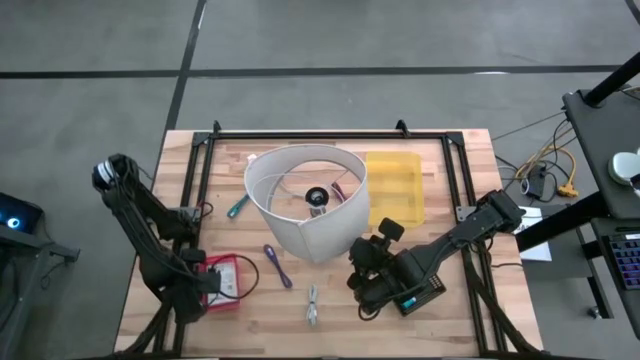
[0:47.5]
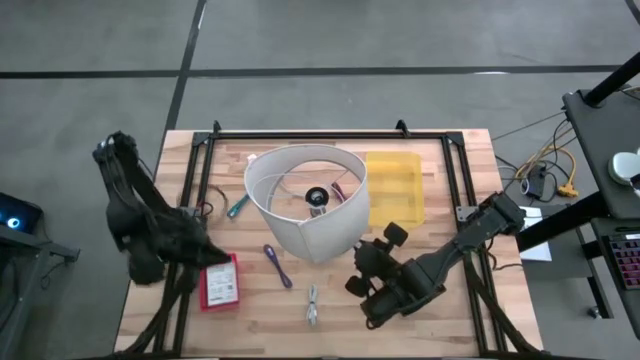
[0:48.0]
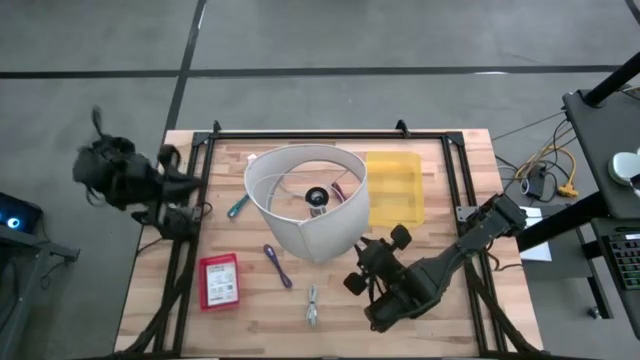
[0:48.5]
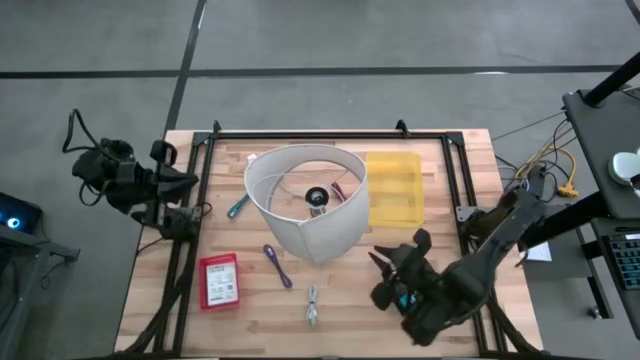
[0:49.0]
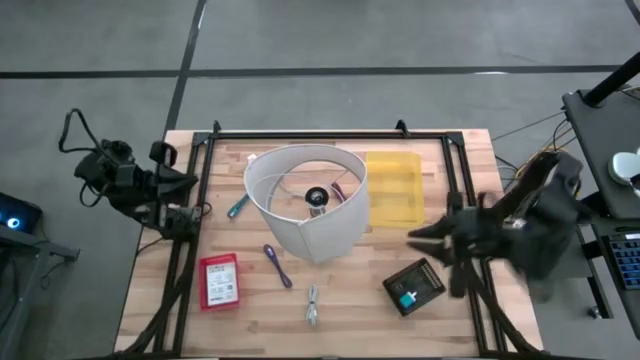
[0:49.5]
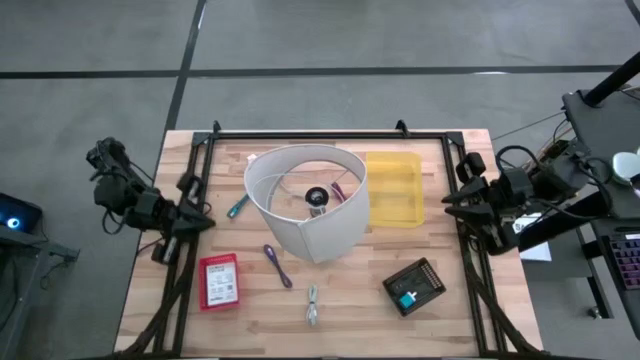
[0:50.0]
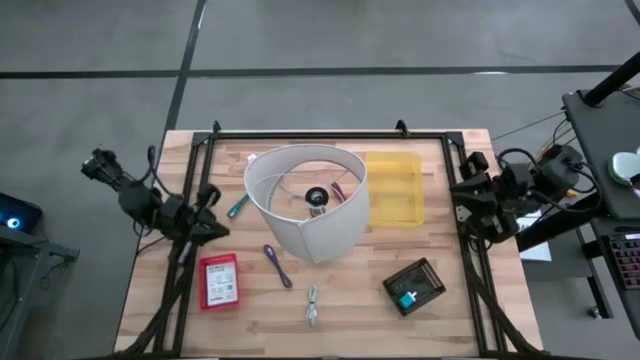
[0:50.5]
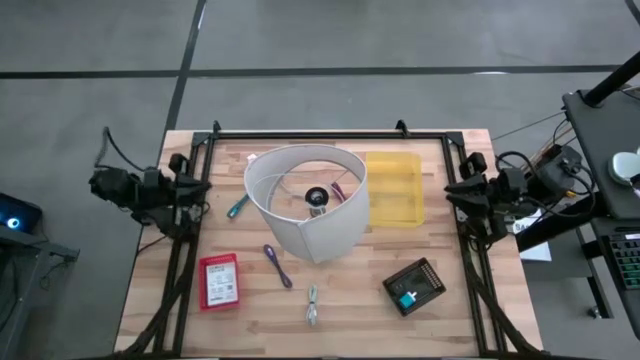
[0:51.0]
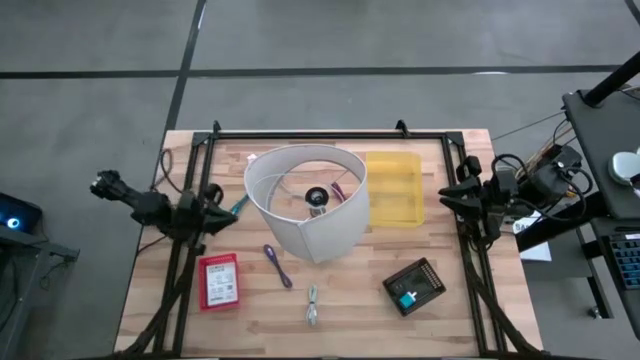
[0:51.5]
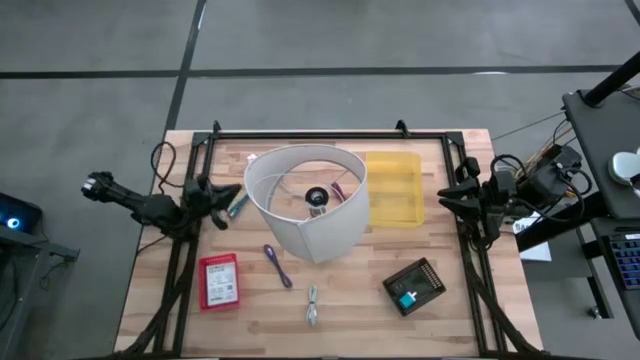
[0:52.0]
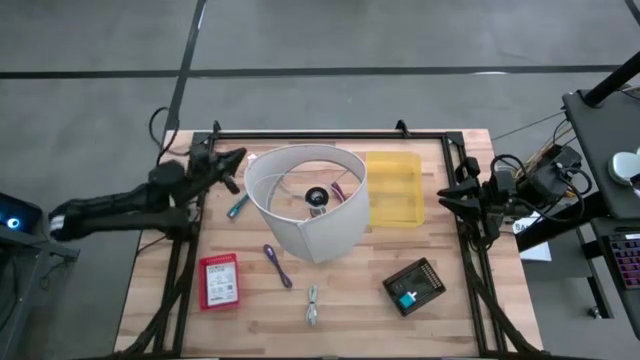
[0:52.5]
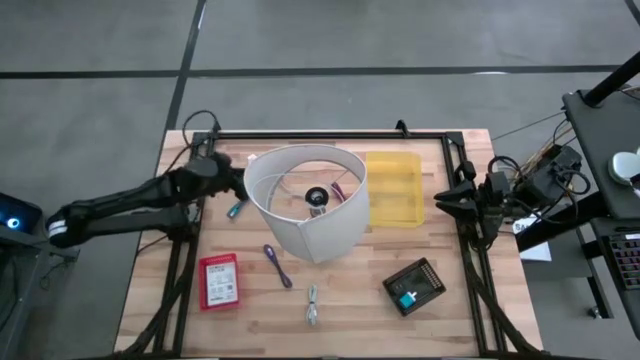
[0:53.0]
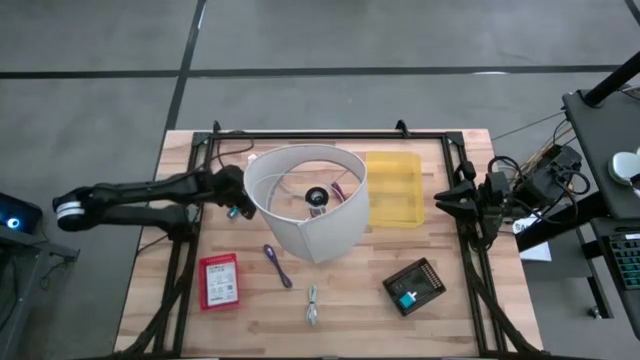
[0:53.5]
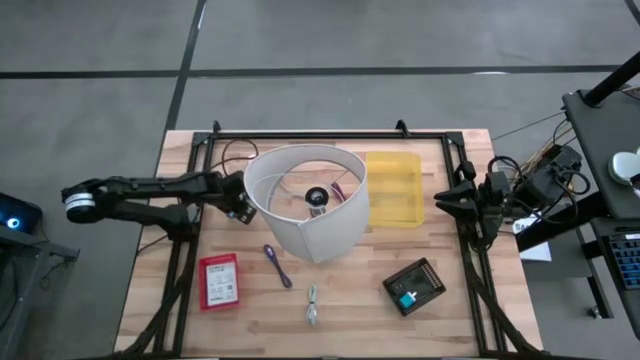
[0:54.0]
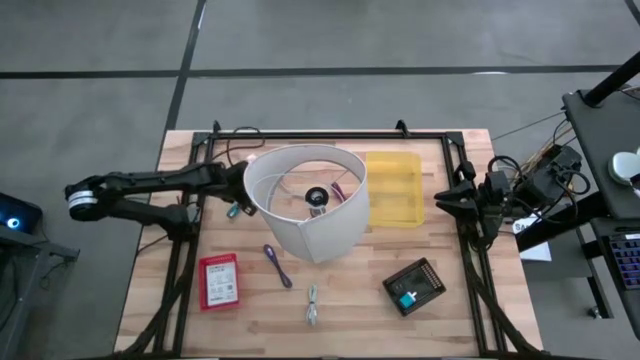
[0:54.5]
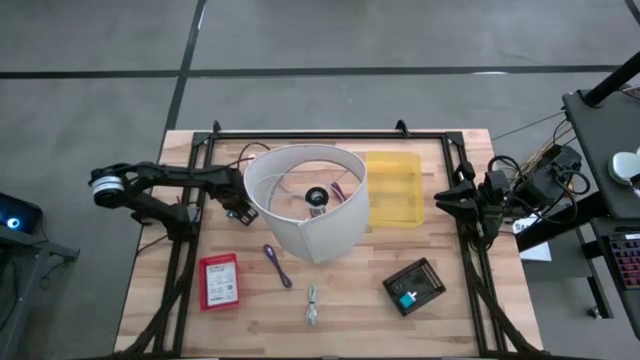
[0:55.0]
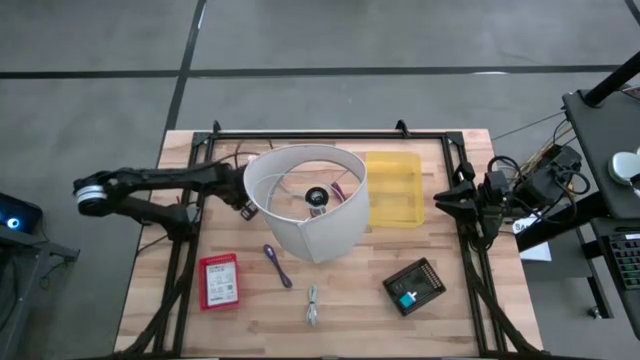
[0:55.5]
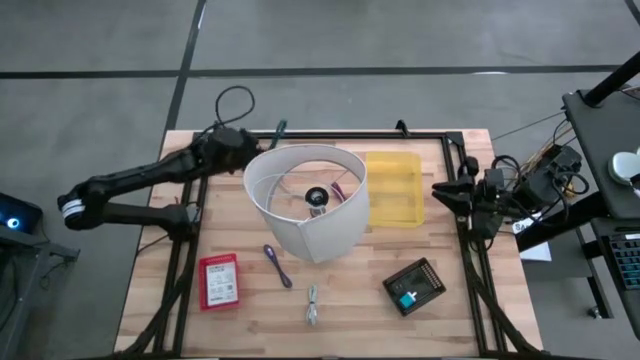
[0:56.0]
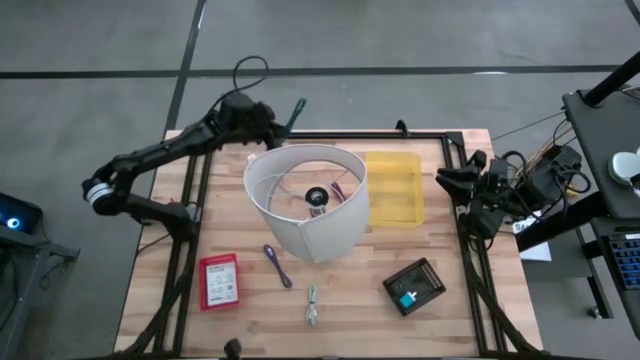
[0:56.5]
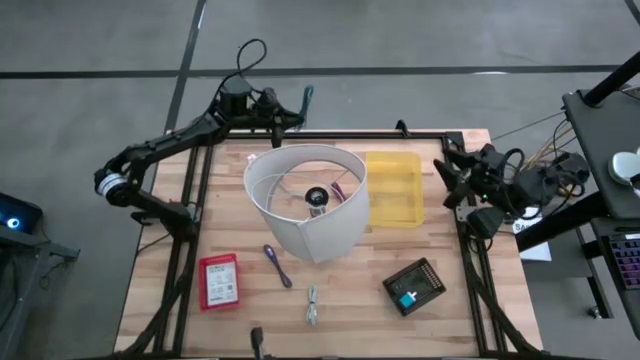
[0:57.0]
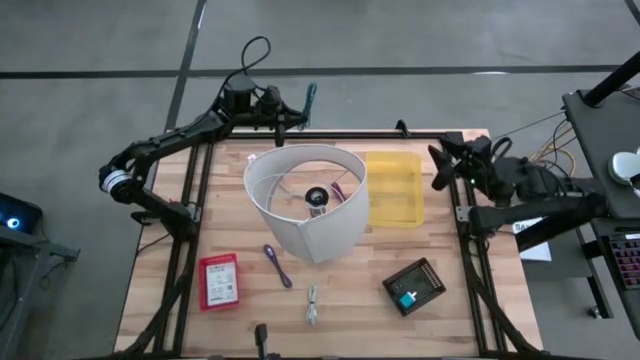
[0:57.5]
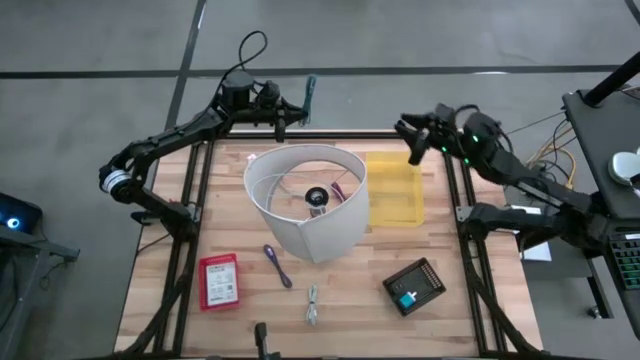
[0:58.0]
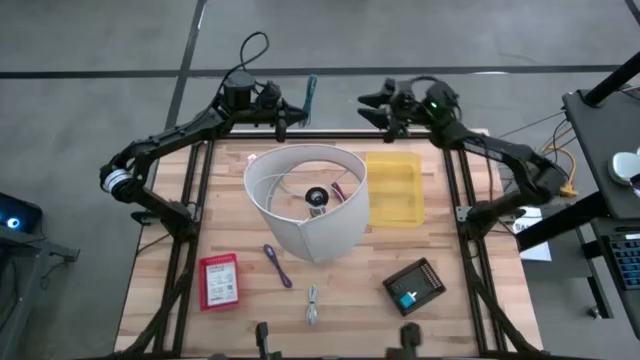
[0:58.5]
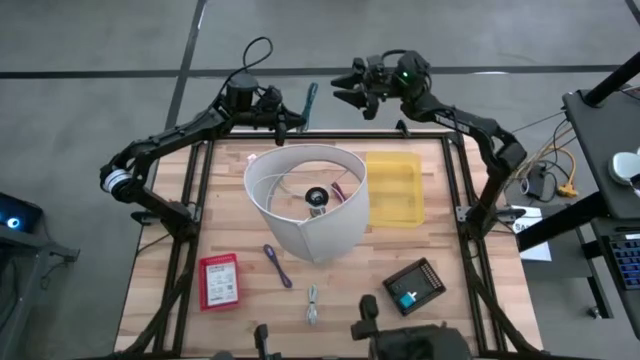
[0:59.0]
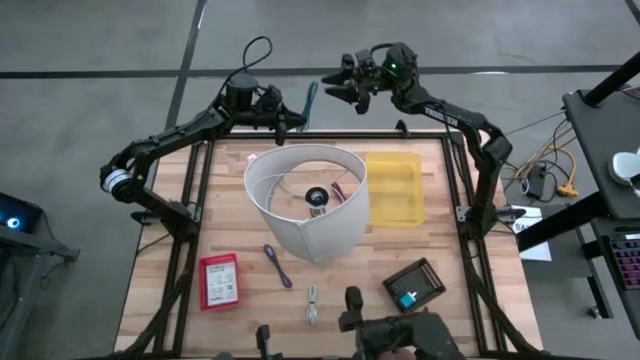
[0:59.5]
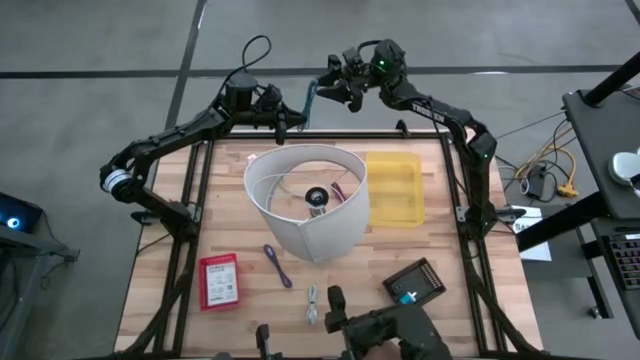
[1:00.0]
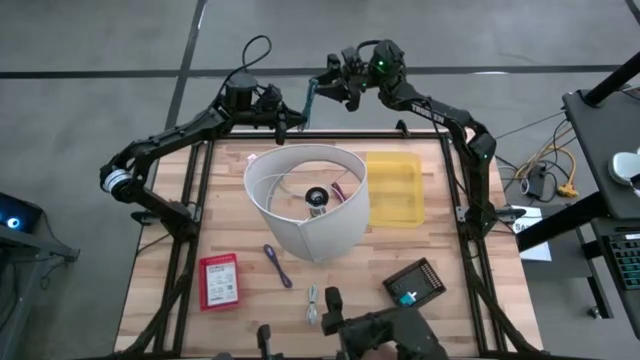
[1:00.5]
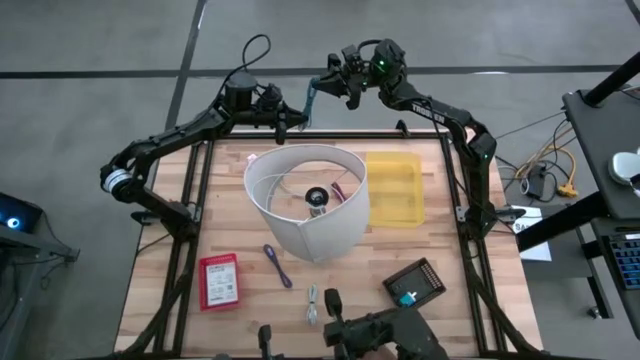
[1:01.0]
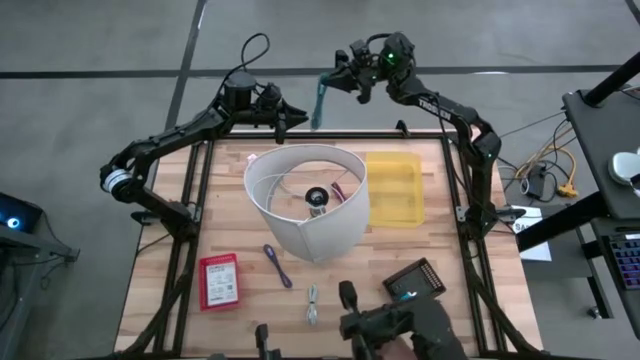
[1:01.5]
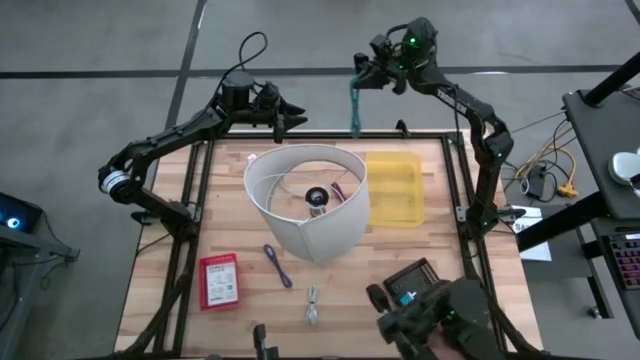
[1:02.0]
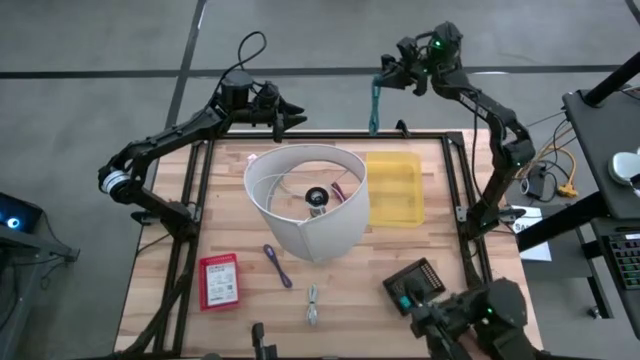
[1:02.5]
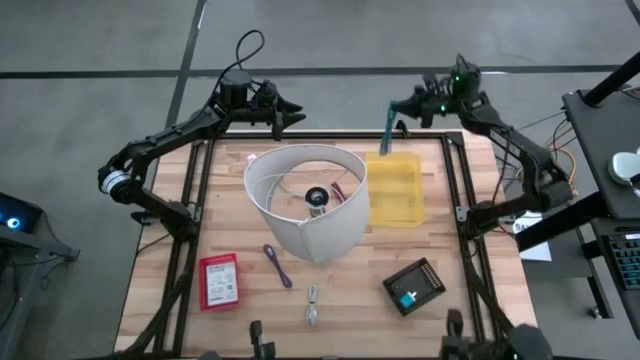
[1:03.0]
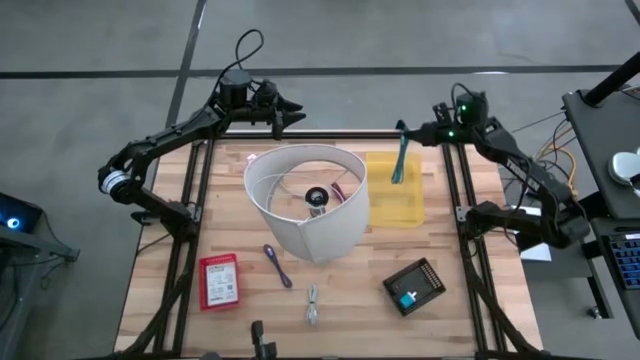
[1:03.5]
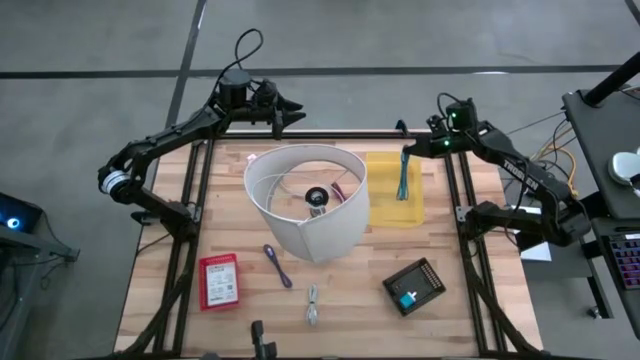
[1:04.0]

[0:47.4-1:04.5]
Task: Pick and place items into bin
Put the blue USB cable into the yellow bin

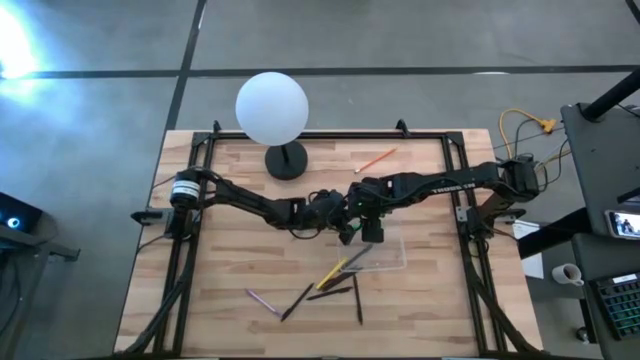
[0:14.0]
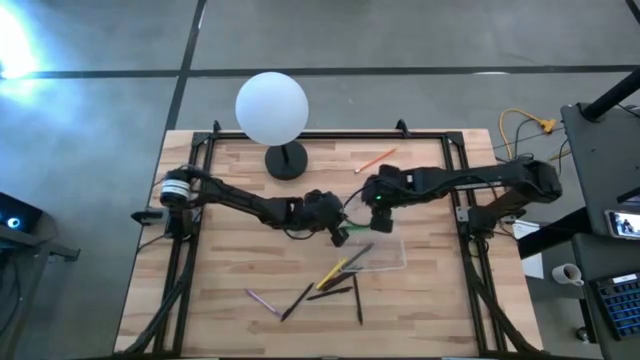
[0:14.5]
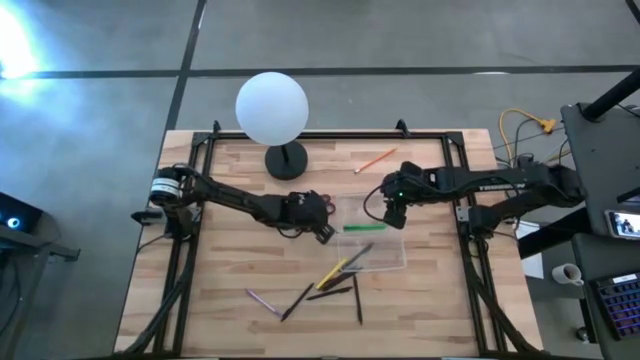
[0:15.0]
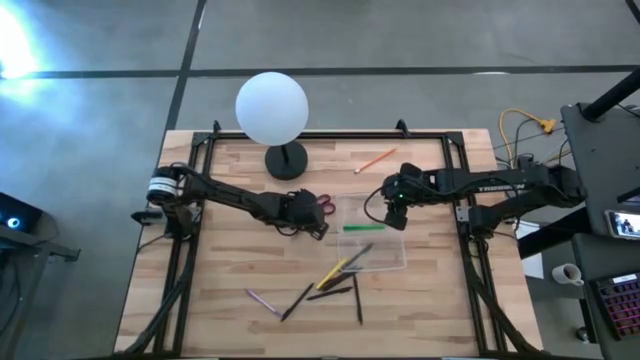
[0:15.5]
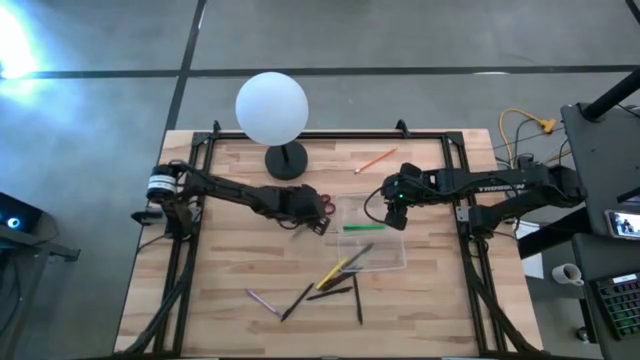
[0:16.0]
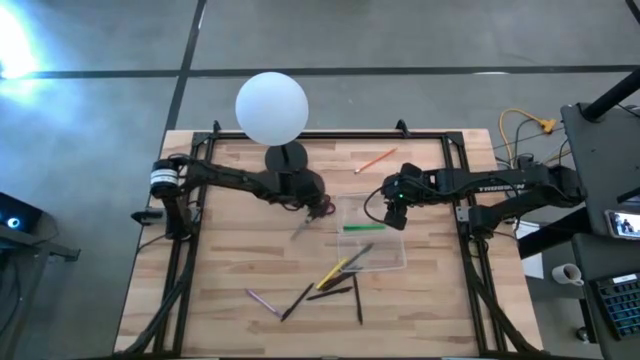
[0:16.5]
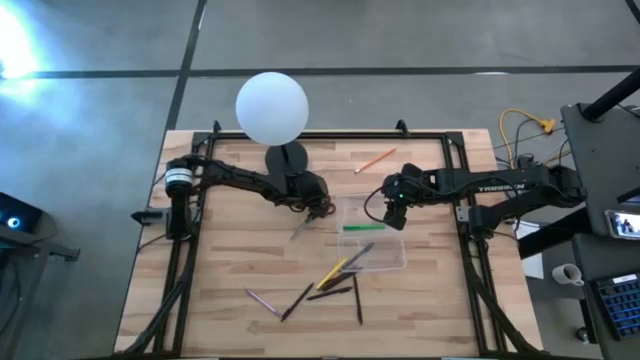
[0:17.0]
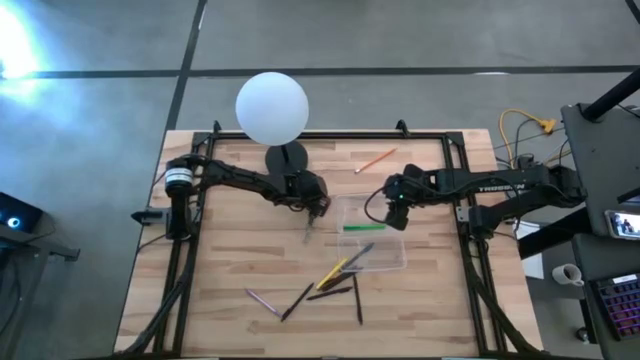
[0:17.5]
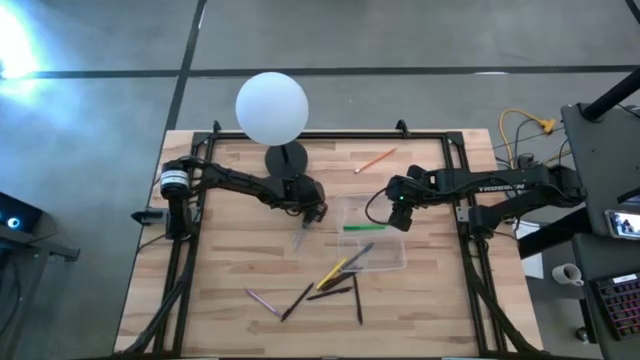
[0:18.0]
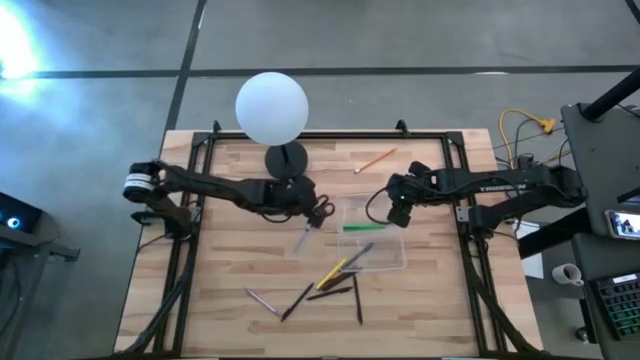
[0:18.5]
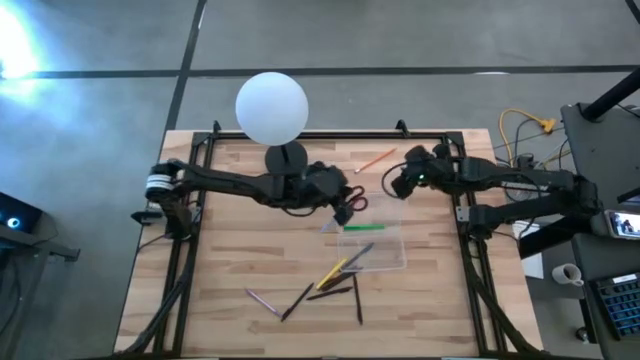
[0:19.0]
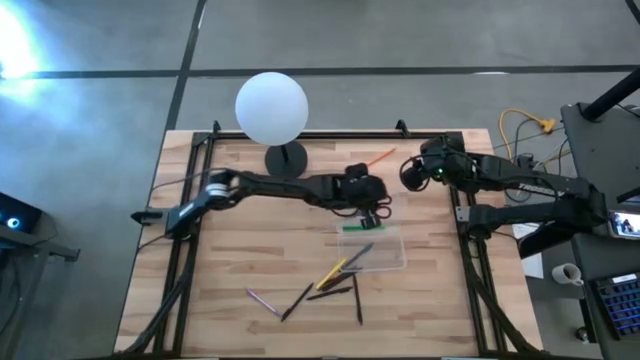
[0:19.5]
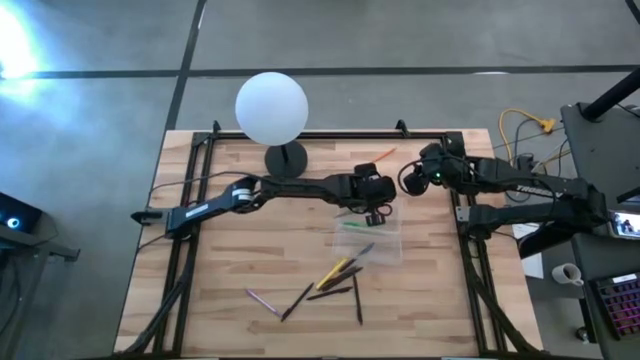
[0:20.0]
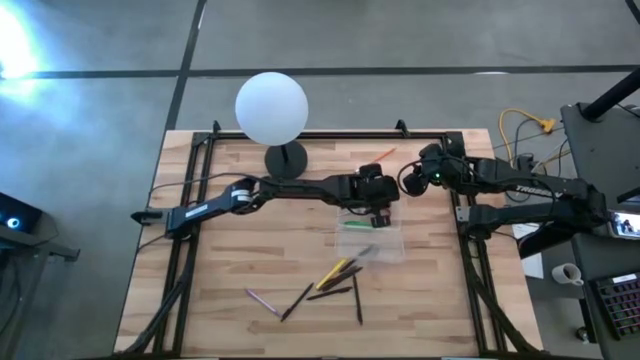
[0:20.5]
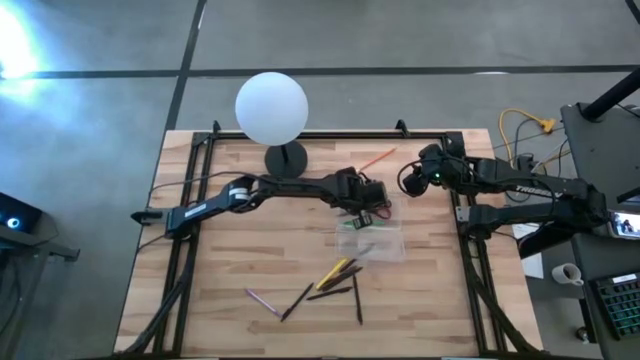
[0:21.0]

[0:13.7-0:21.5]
Task: Pick & place school supplies into a supply box
Put the black scissors into the supply box
